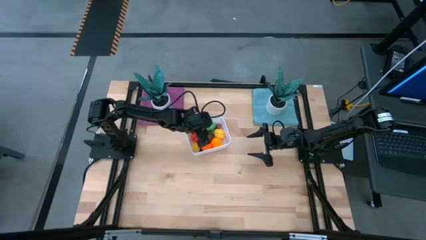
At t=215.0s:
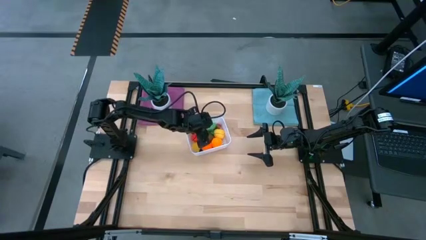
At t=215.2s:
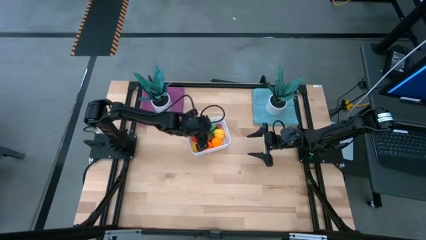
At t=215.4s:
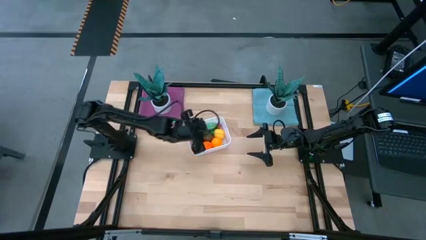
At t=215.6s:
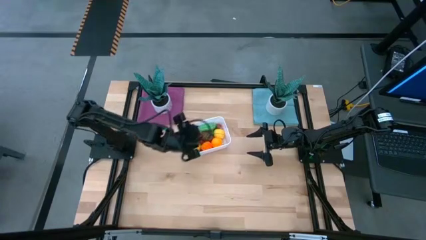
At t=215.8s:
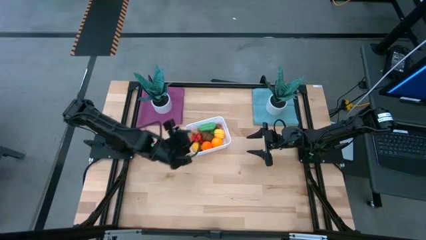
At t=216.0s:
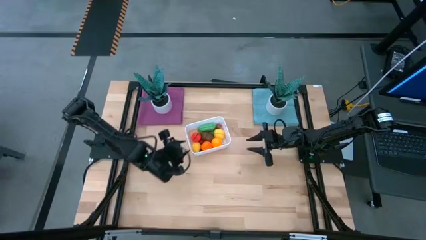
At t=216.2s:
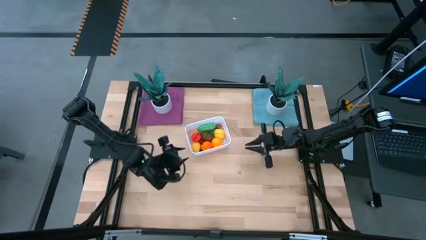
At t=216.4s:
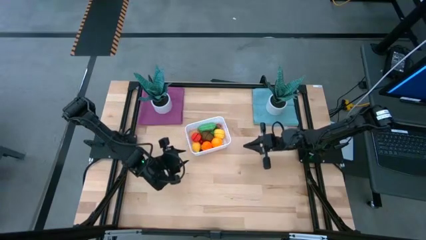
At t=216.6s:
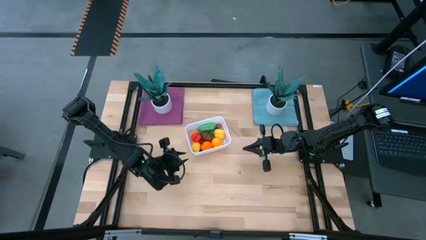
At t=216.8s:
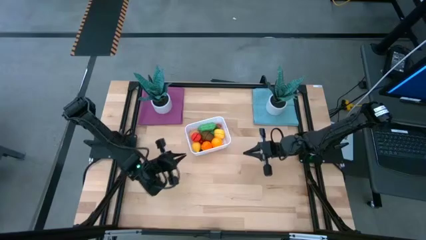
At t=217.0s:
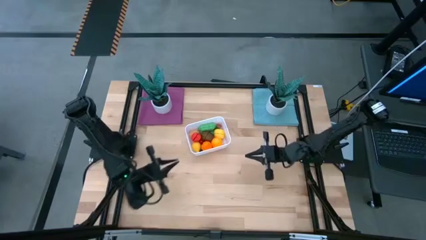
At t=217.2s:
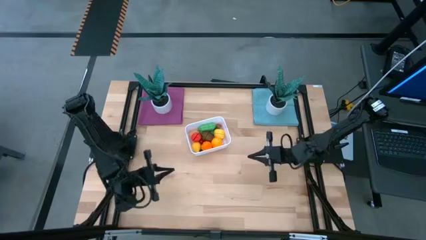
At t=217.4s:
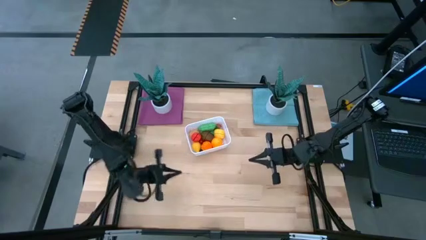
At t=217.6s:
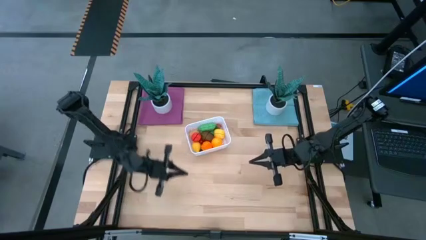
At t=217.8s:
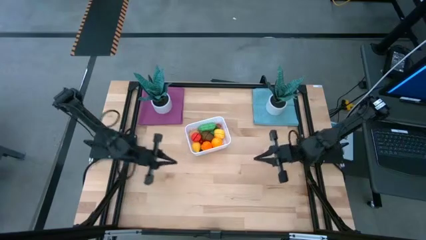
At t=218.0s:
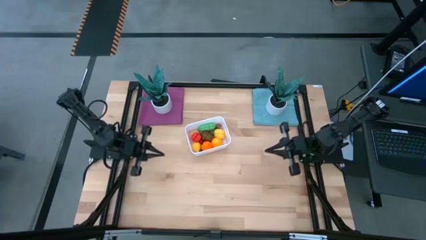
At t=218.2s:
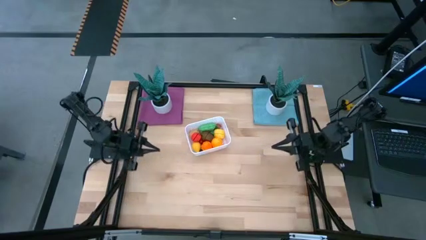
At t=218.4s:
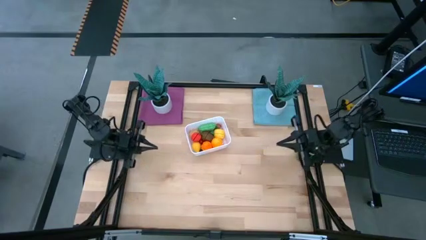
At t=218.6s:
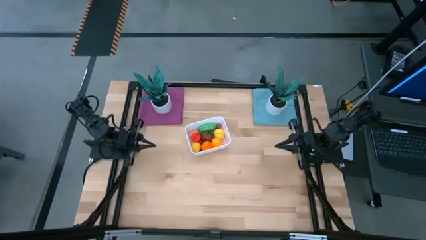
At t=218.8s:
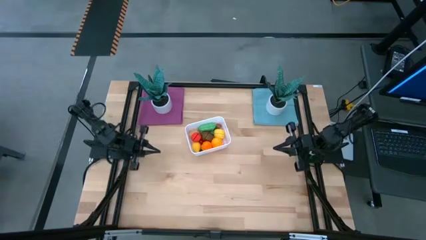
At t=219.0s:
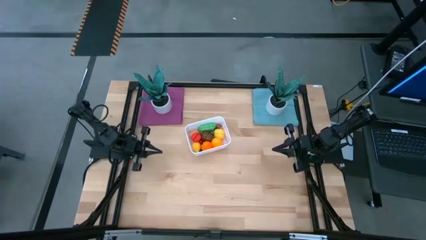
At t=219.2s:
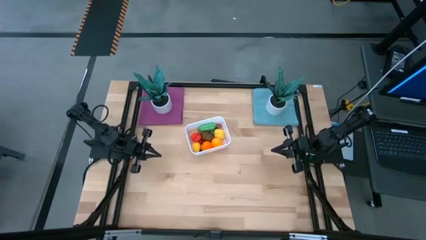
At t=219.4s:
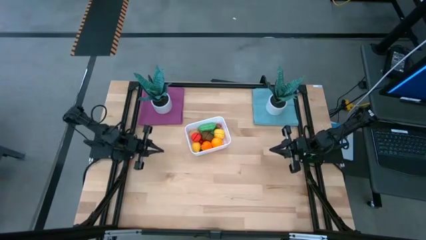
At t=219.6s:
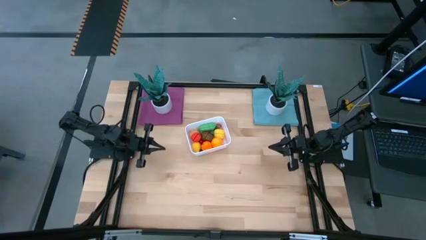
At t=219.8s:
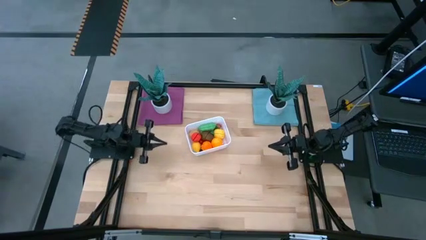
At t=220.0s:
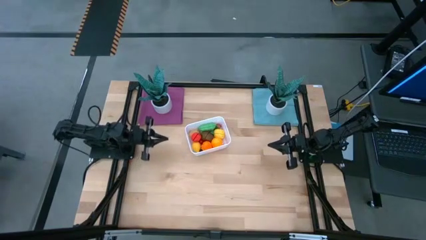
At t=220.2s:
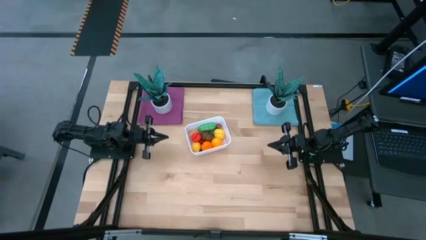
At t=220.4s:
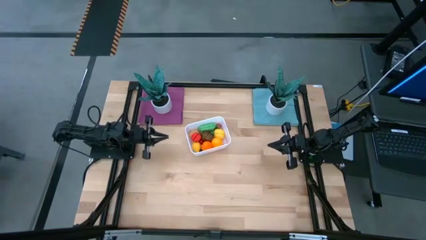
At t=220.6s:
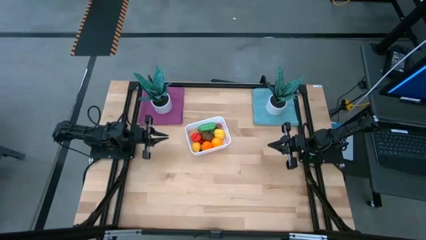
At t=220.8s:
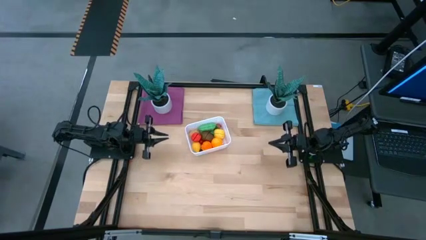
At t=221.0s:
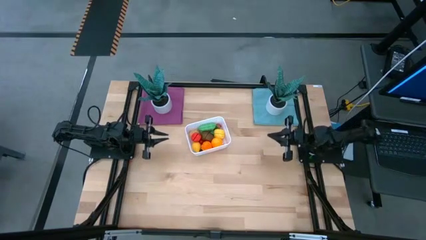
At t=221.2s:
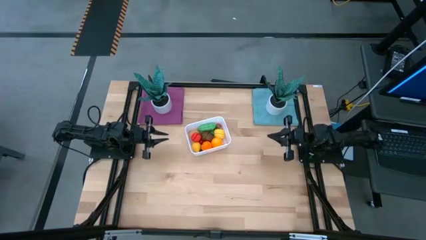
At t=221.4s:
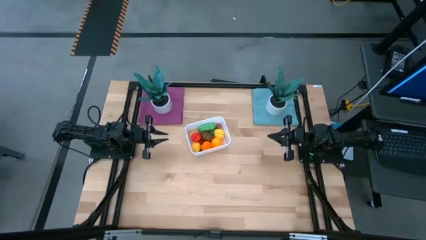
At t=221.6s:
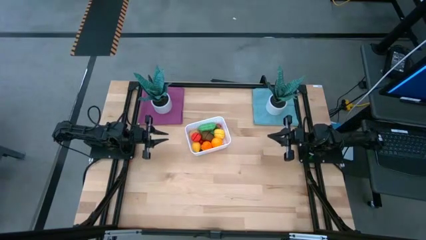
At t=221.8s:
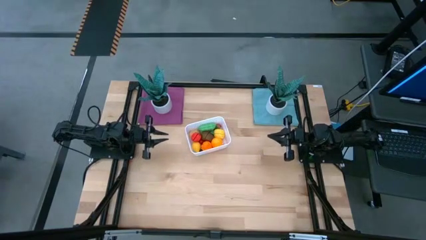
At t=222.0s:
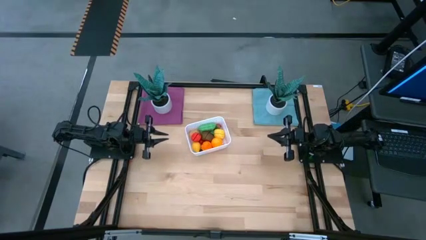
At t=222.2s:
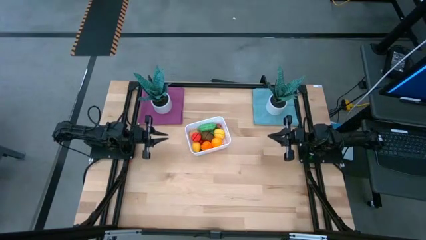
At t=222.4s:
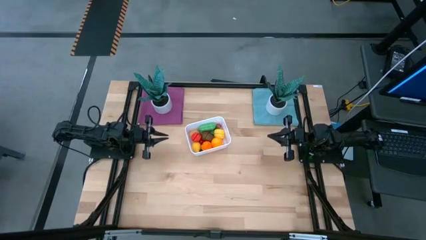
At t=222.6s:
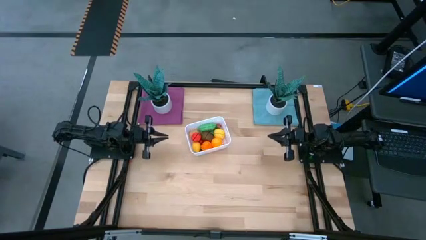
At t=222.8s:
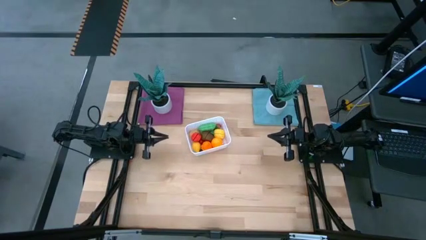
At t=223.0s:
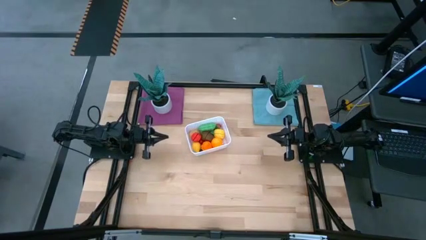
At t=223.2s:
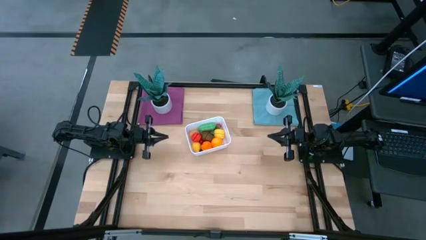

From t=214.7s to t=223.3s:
Task: Pick and placing Produce into tupperware
Return to Home Position

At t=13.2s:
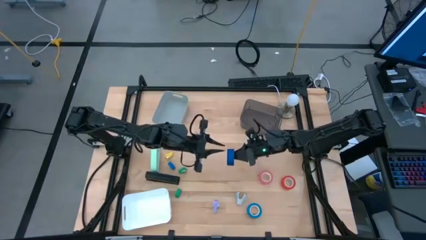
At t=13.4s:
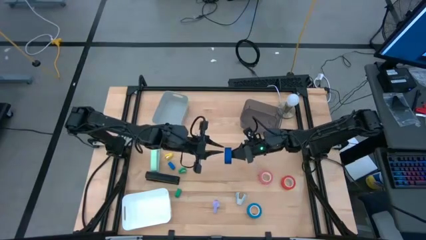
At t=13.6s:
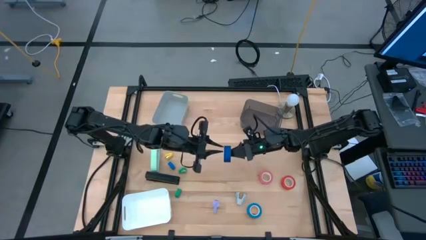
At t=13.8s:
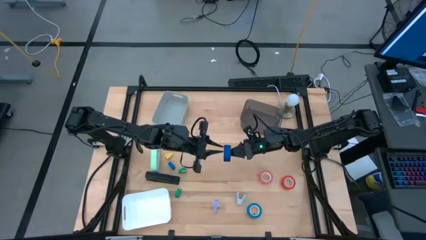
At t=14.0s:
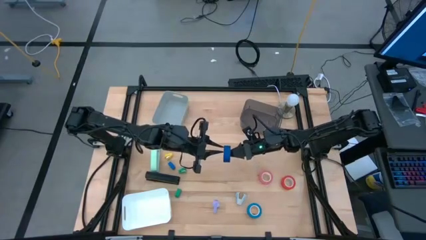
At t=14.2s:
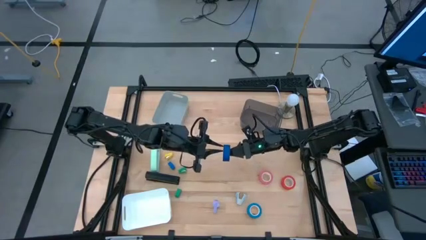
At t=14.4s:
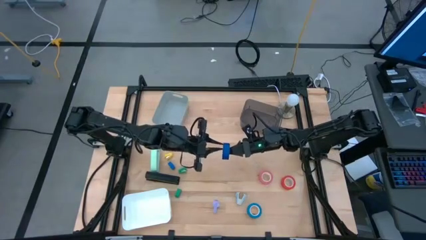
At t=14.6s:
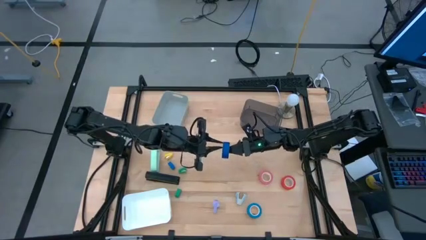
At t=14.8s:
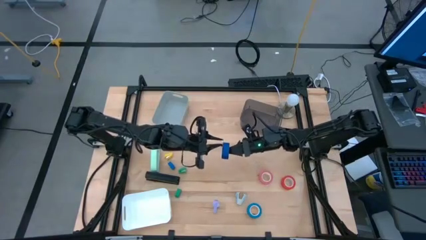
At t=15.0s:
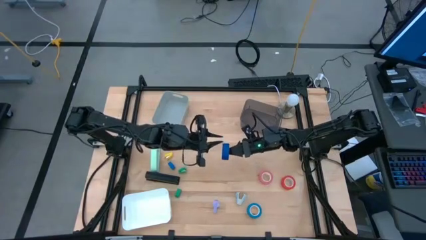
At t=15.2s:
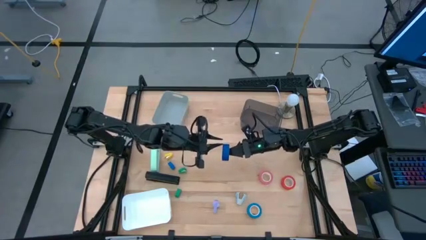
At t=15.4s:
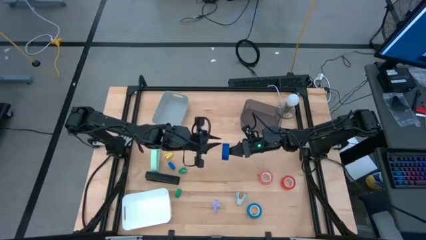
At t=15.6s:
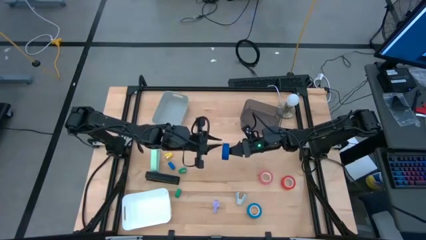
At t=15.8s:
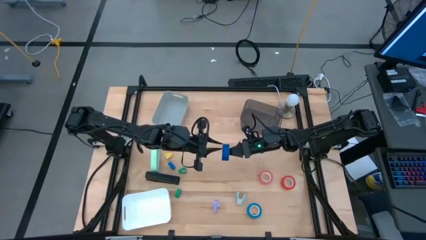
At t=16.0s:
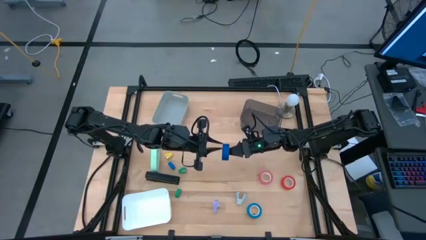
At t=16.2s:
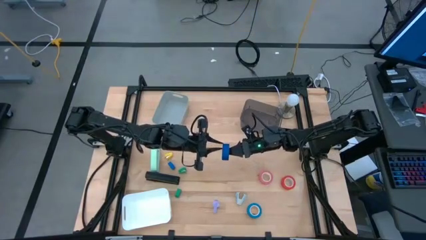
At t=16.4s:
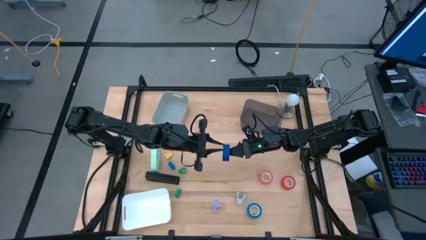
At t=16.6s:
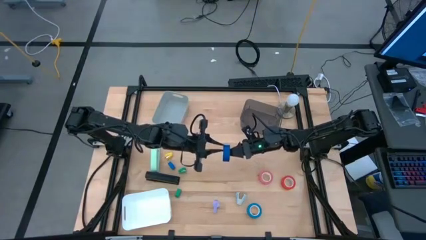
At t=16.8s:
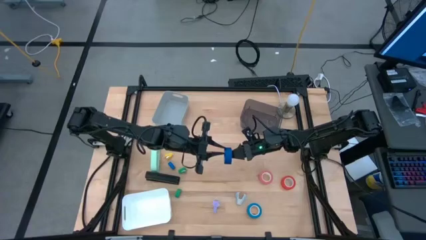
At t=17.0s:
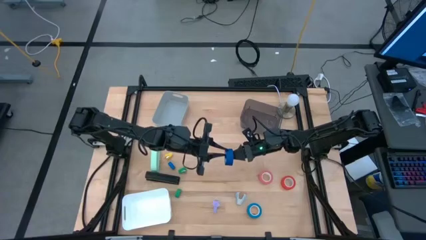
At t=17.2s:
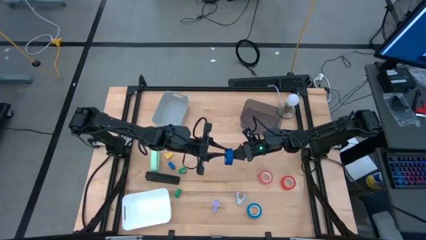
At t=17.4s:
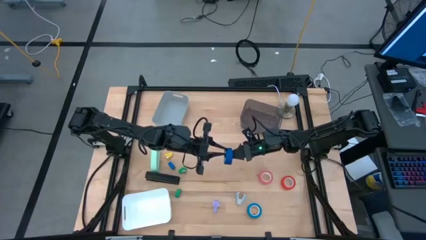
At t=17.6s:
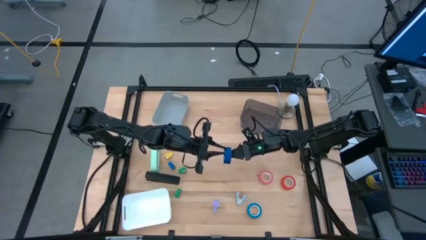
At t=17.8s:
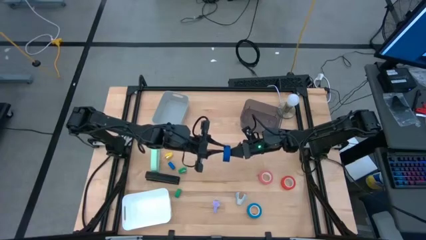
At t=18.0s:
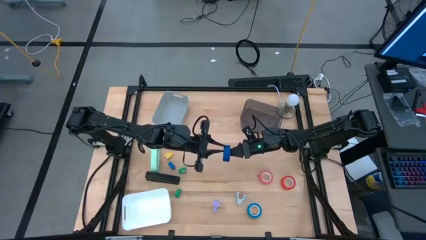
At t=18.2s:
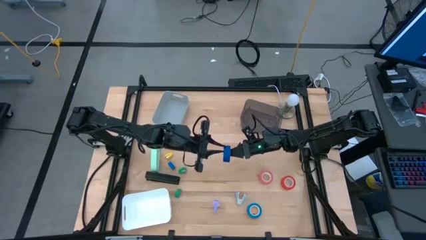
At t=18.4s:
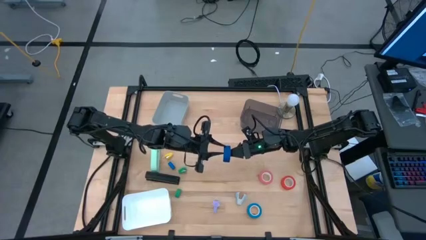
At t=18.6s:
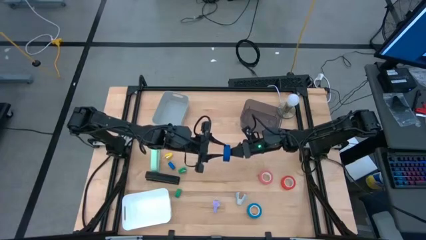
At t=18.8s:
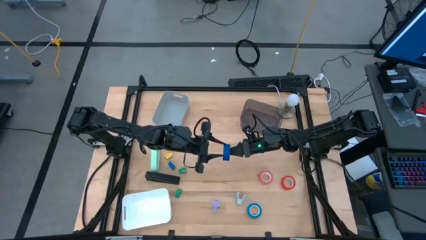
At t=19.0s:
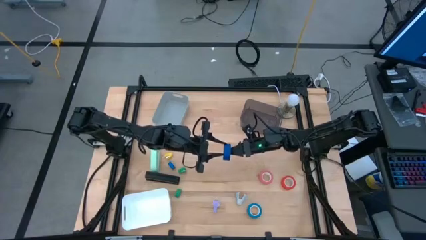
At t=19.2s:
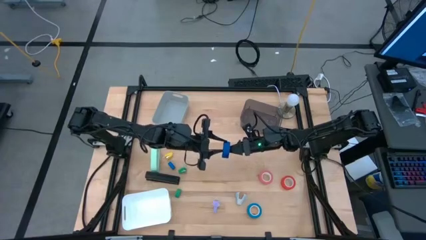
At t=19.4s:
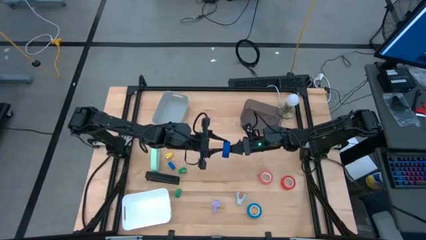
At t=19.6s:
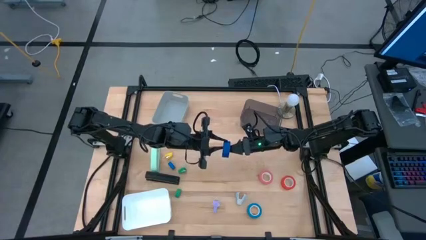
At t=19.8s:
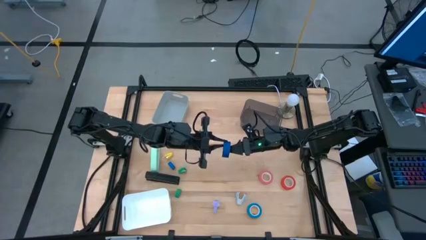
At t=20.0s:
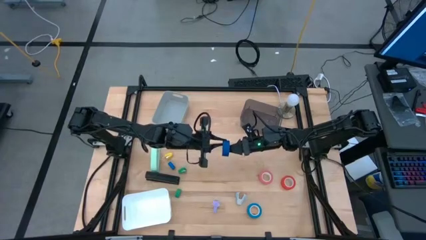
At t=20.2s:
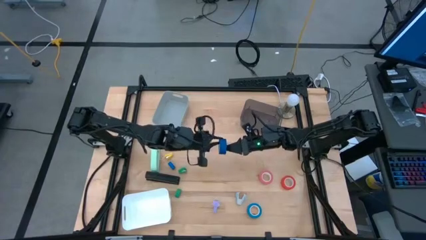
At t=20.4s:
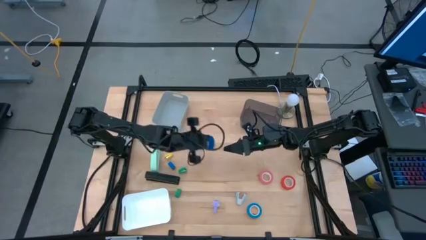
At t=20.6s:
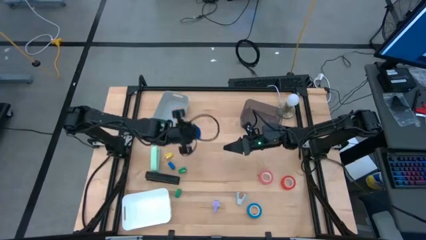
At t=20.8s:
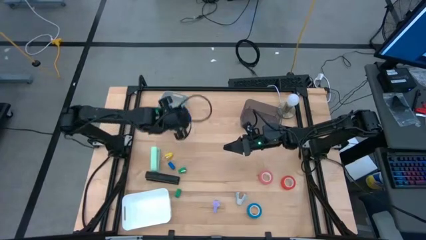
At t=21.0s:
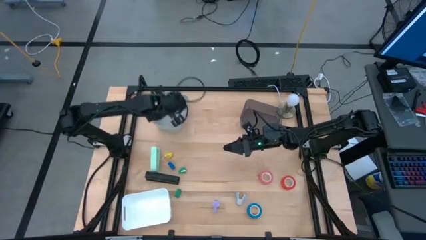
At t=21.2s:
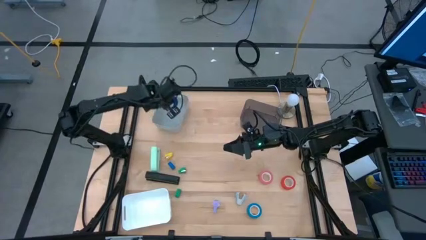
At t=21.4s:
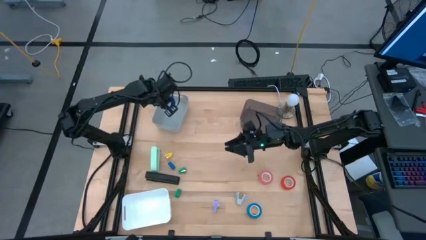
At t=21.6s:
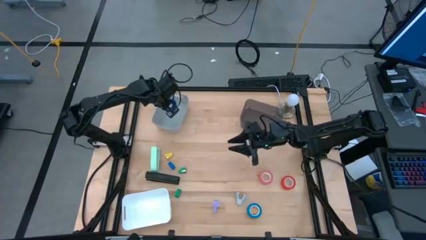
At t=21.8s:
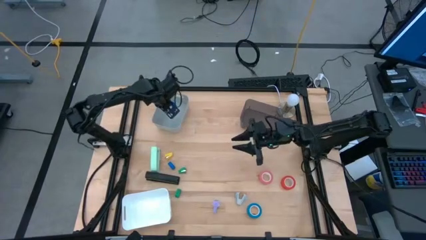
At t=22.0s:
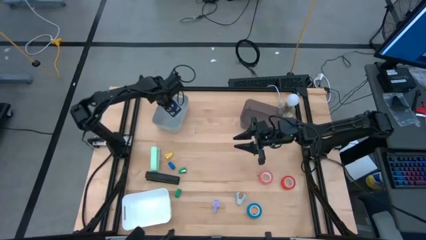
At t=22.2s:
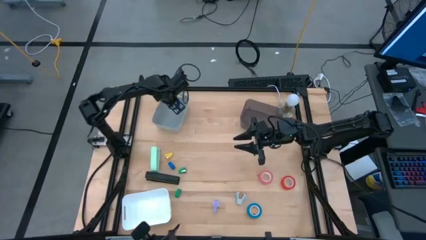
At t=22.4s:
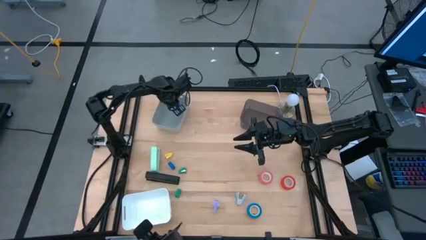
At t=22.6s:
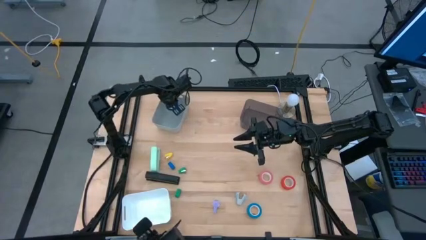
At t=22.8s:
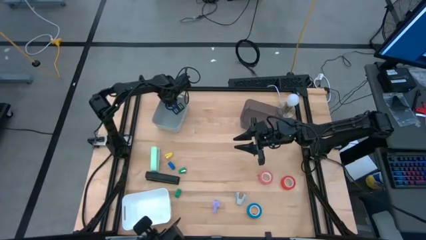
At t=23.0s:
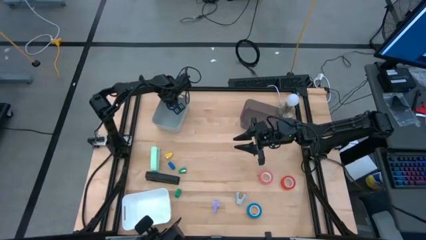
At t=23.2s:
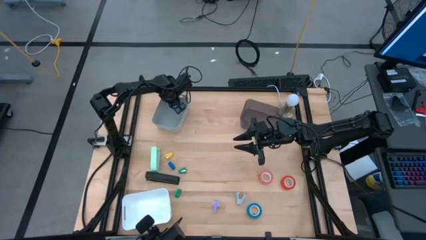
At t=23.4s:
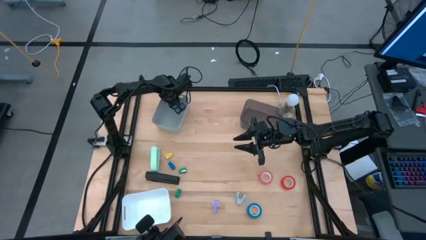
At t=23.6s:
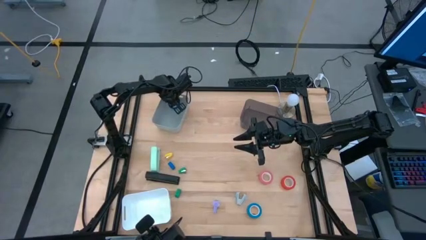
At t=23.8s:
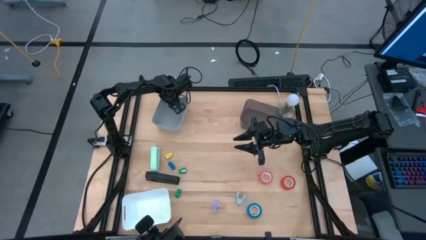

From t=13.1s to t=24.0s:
Task: Pick and place Stapler, Stapler remover, tape
Put the blue tape into the gray bin
